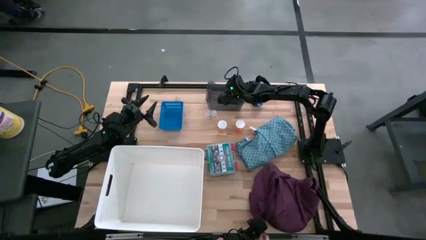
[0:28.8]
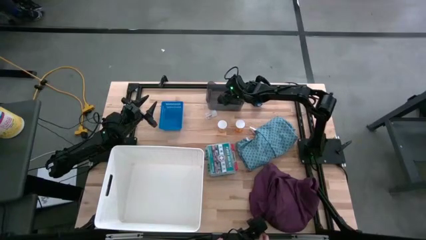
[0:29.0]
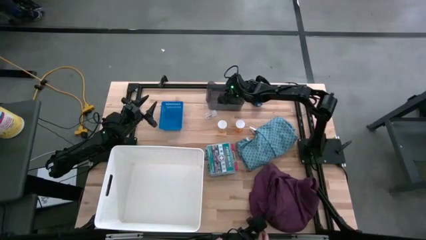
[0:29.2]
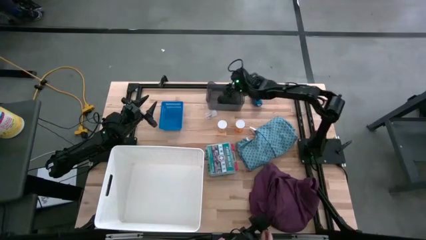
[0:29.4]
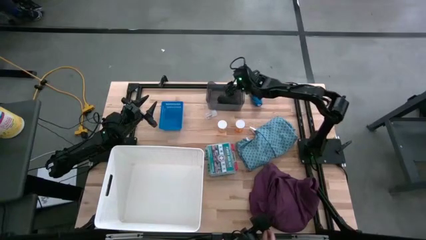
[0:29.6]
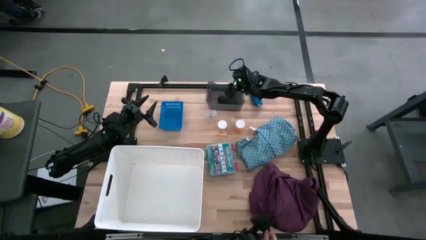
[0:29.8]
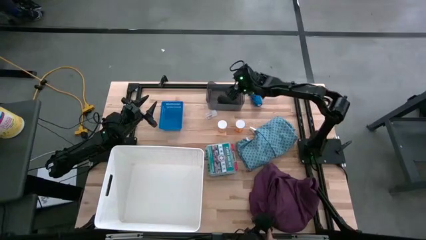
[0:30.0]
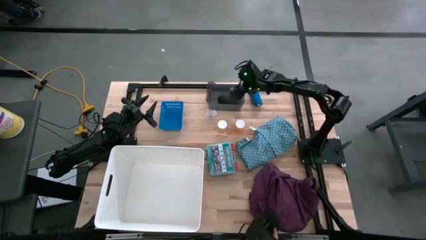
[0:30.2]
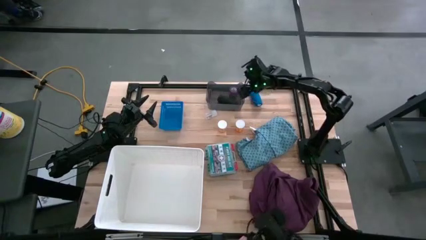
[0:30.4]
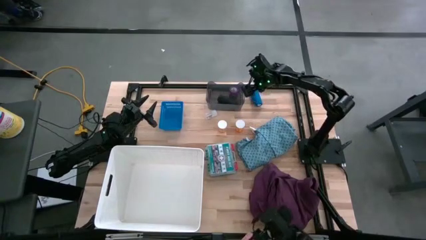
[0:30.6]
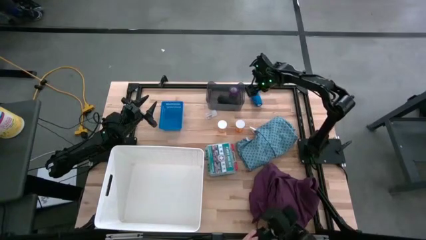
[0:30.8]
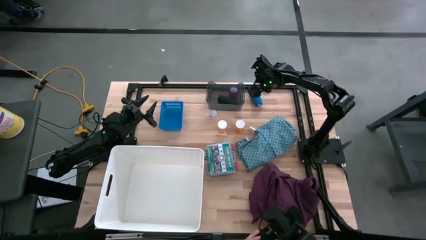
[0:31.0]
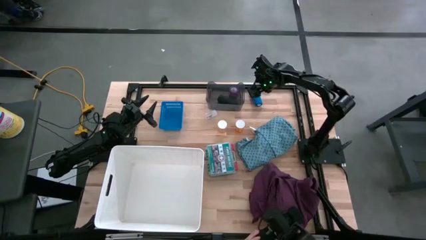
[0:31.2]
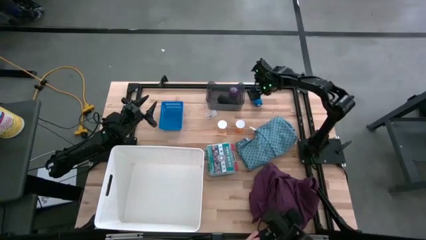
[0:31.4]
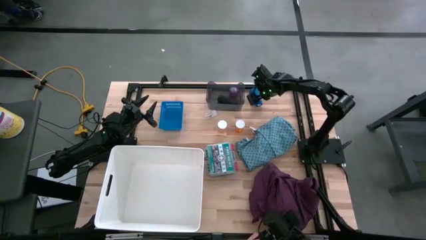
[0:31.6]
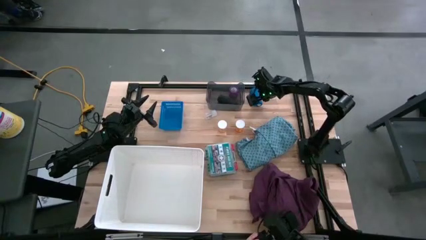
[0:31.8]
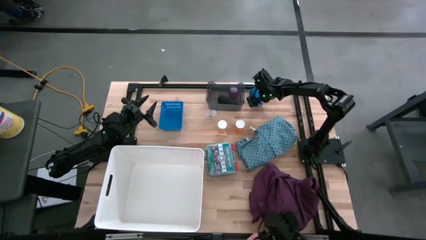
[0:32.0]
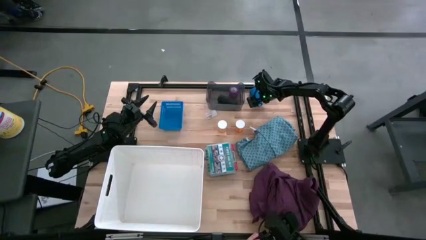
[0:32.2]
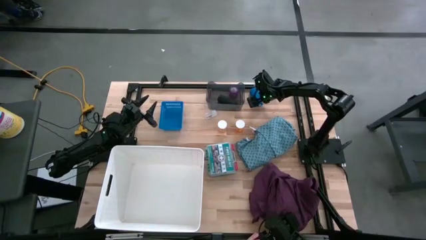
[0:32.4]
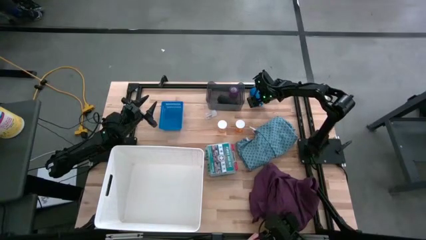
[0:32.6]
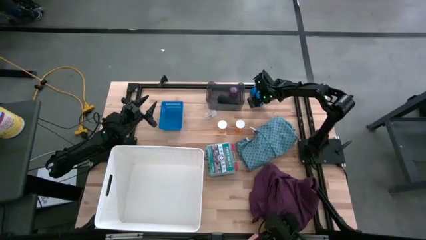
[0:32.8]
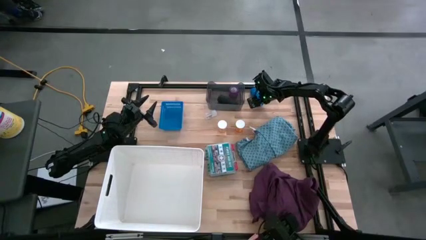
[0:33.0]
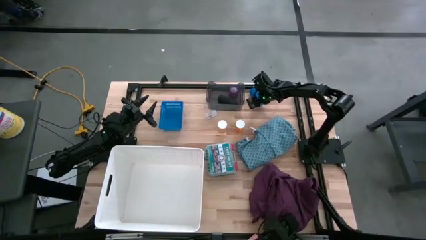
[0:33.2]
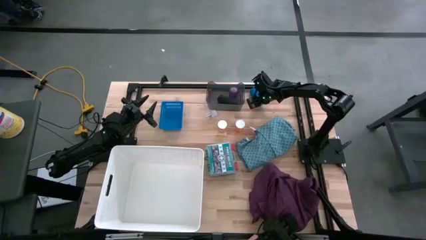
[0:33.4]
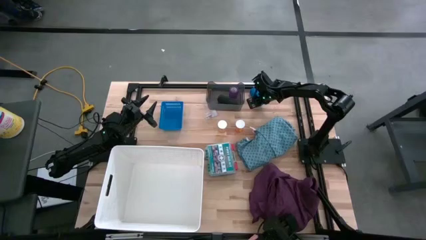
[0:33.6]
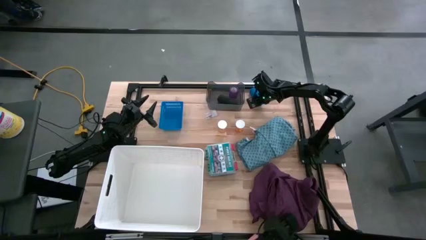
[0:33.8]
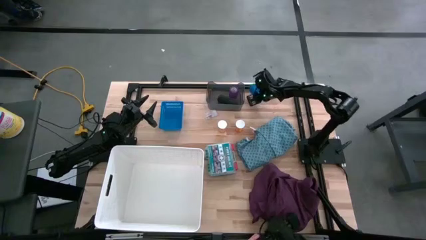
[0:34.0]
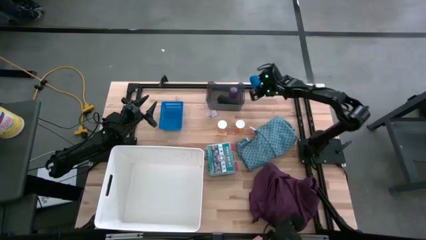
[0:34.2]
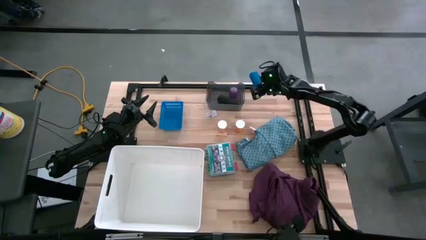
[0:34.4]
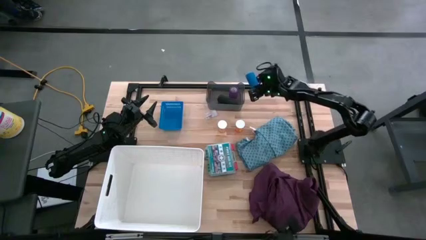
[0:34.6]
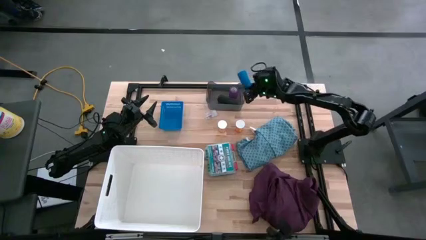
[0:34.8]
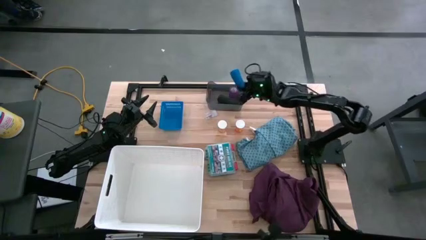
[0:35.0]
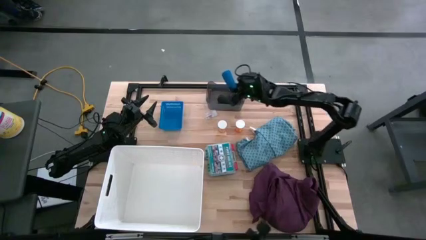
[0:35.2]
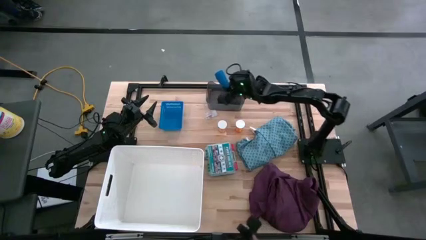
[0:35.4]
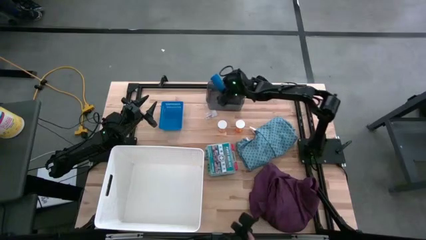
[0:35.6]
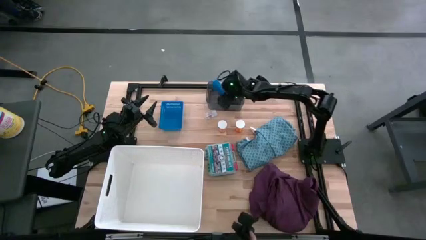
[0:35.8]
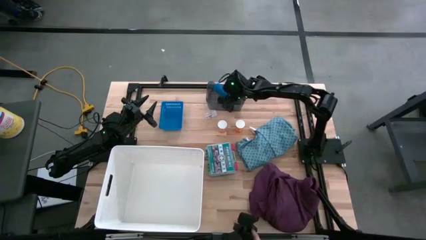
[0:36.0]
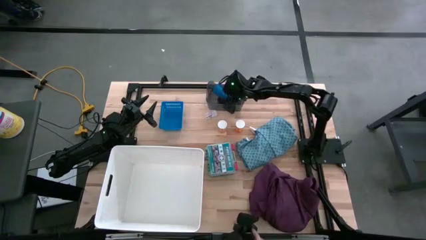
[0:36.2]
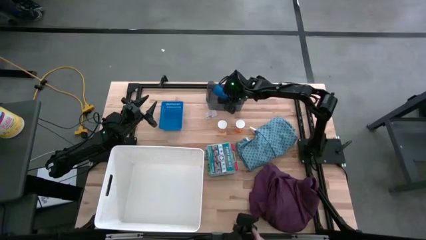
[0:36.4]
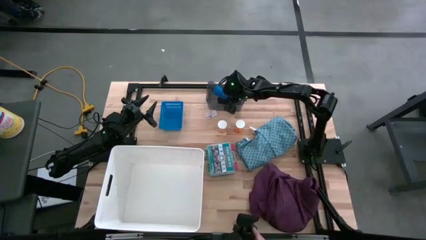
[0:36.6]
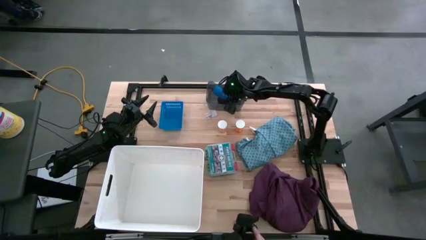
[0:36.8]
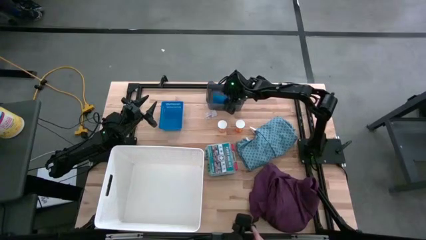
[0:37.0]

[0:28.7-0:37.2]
Task: Pick & place medical supplies in basket/bin
Put the blue bandage into the black bin

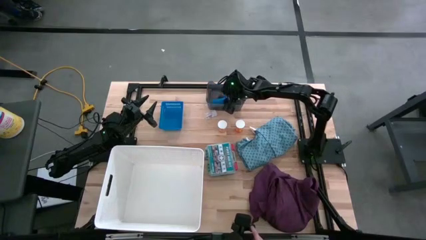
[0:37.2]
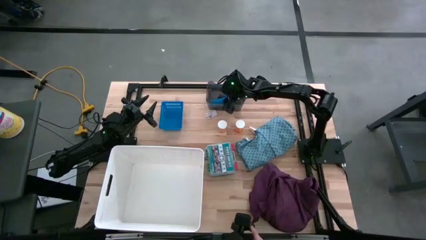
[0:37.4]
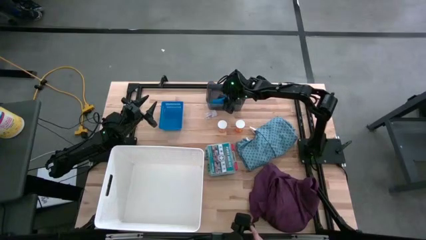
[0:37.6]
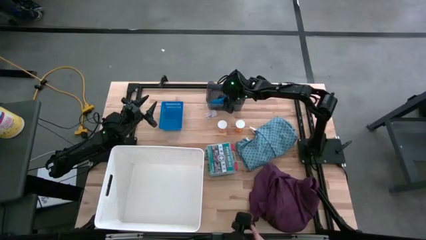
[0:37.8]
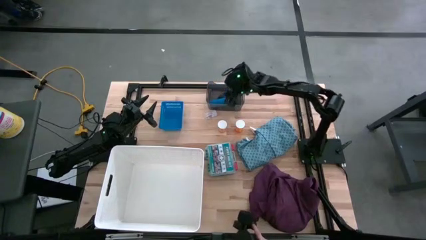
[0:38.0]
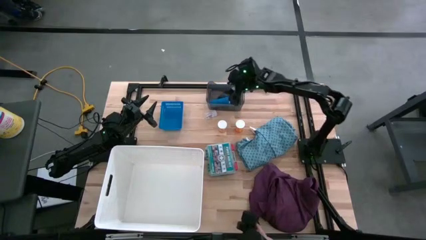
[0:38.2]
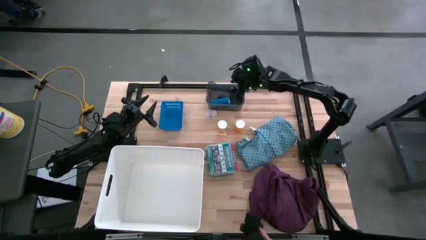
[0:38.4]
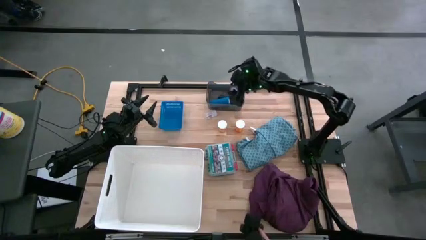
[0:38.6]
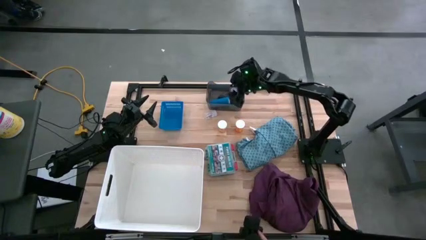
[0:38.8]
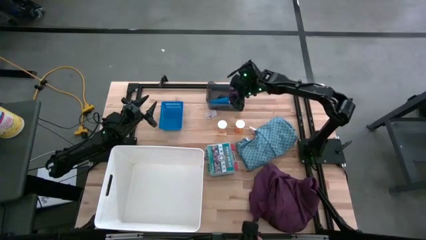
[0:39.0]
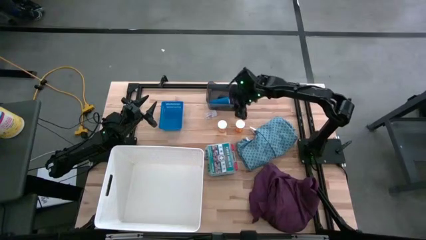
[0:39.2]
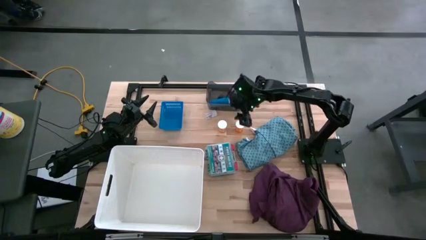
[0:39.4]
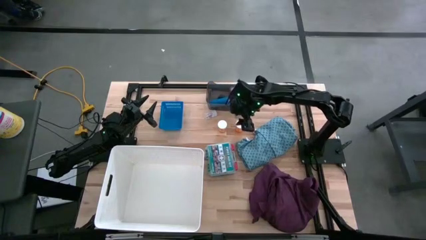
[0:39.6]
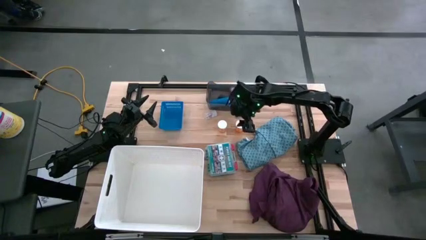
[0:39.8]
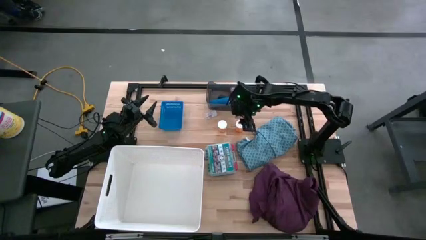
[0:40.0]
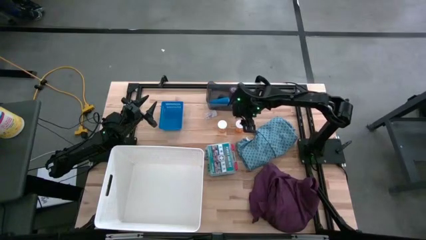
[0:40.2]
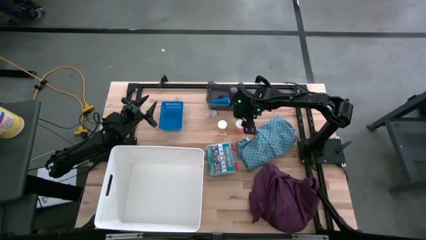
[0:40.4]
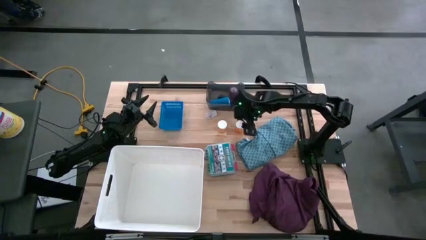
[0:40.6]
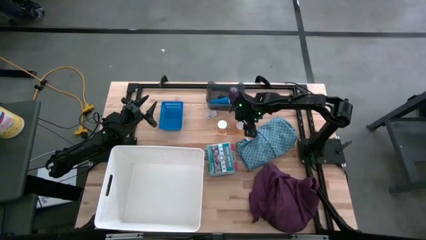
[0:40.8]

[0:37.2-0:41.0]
Put the orange pill bottle into the blue bin

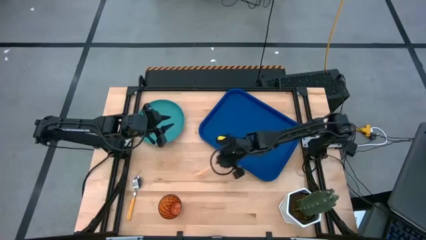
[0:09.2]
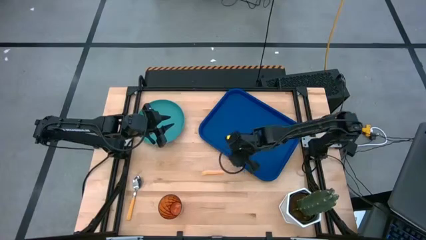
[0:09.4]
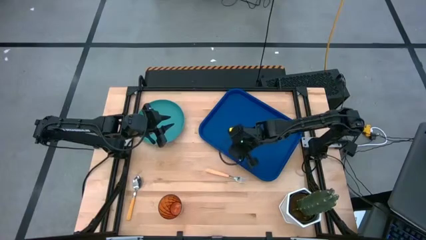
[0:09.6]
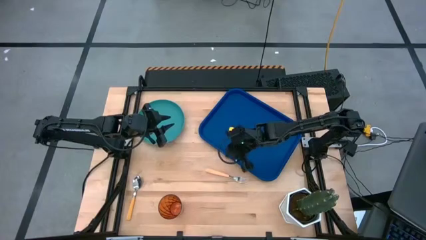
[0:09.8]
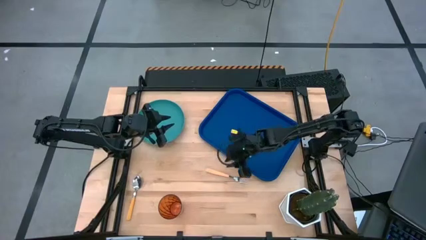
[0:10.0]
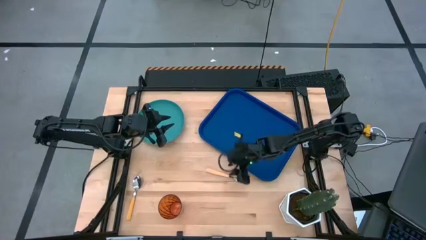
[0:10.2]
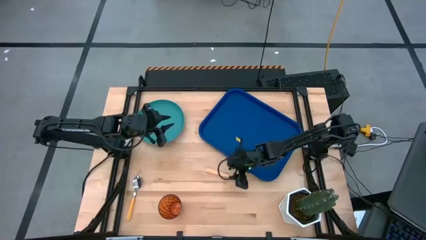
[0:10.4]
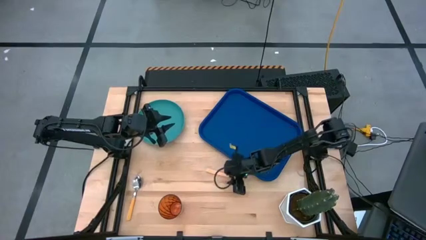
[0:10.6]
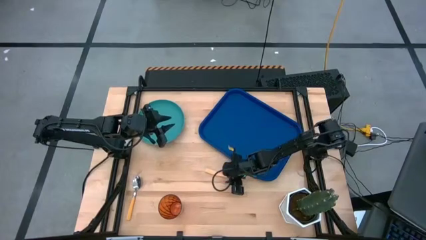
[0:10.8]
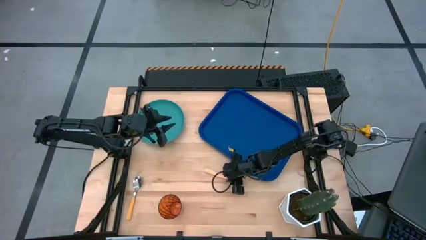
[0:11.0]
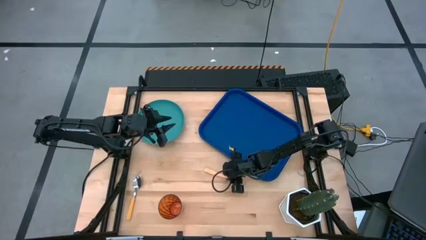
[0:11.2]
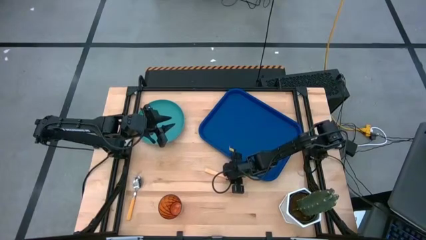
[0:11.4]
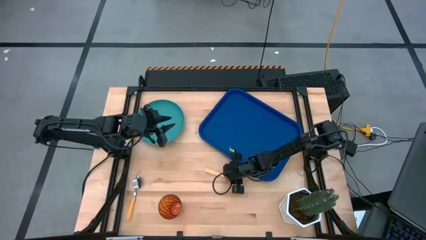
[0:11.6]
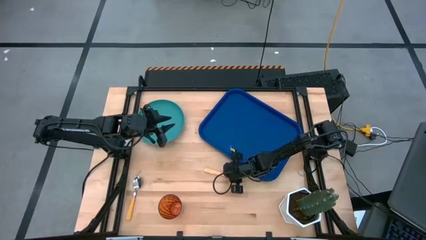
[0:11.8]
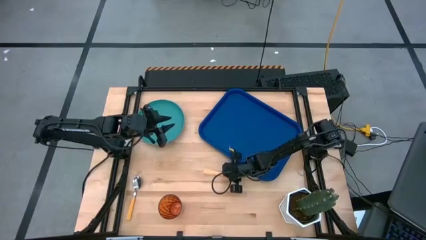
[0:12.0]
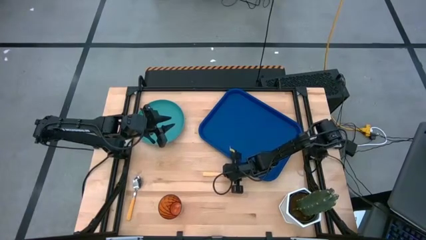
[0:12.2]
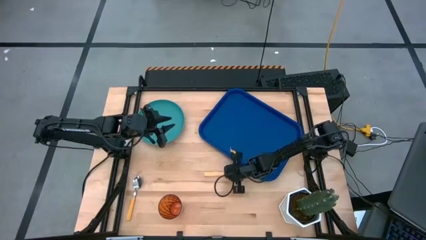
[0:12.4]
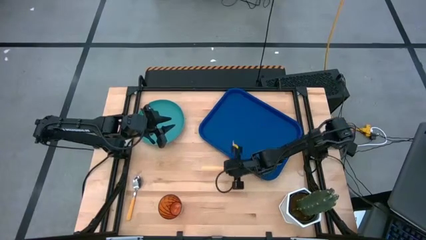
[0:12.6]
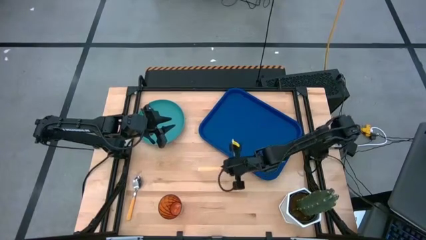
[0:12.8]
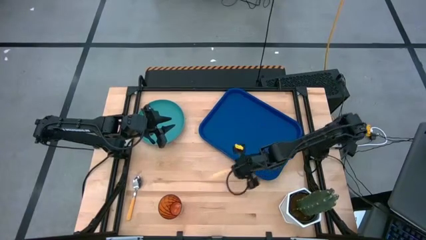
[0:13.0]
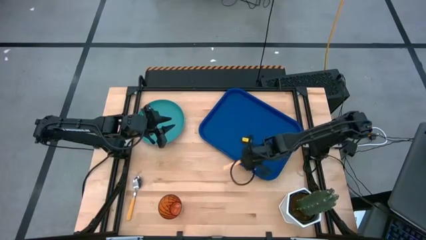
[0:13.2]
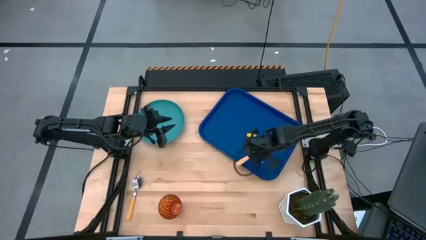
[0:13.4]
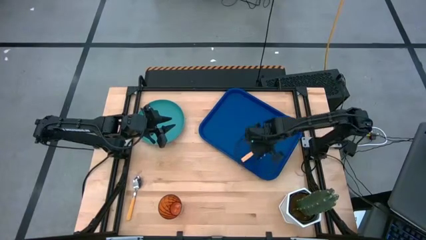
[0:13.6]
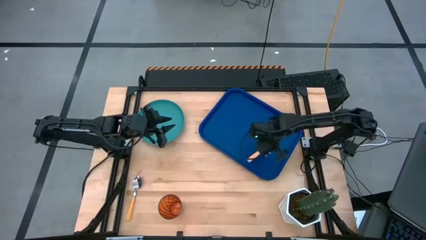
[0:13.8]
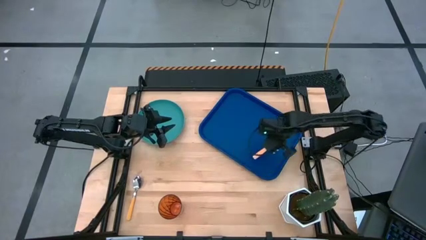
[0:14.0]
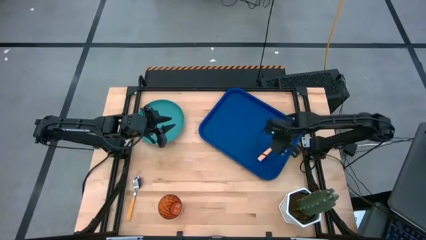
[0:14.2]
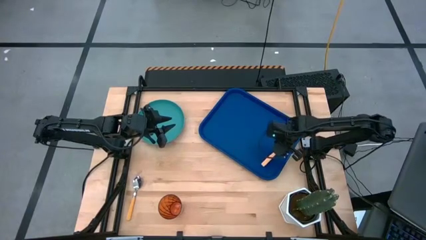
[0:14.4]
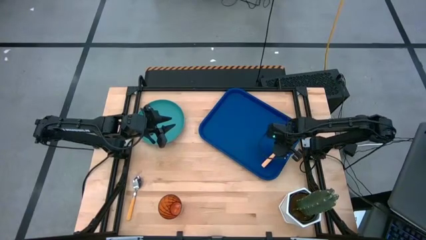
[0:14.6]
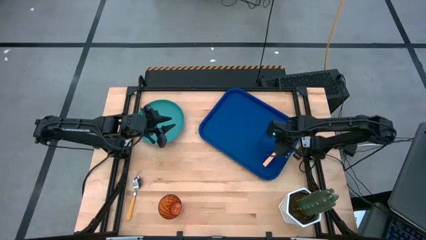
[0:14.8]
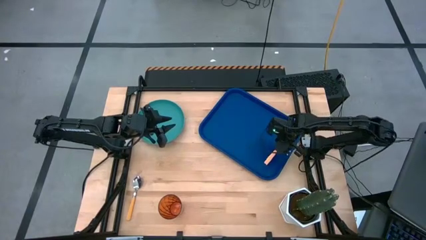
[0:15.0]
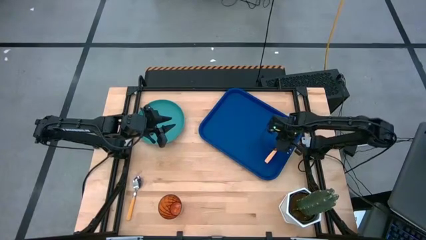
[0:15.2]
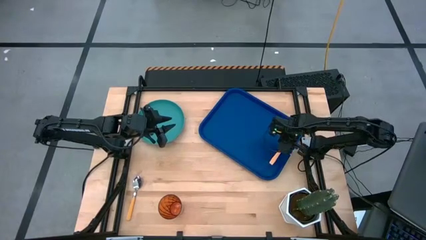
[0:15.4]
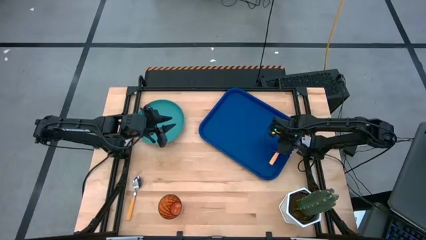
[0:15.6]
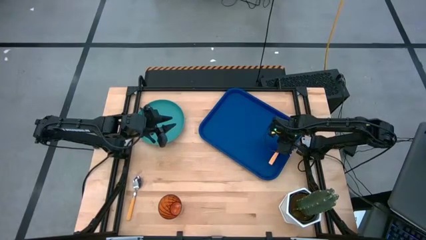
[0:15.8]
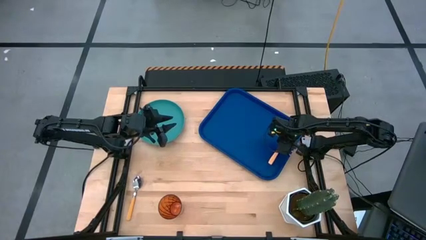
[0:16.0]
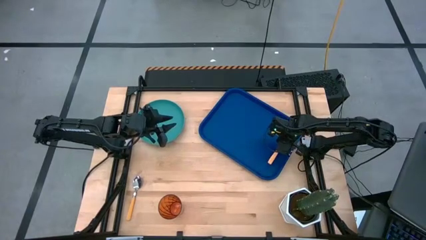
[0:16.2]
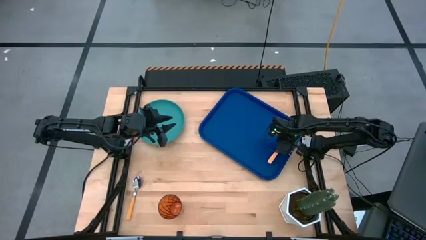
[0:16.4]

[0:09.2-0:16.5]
Task: Pick and place plate/cup/fork/spoon on tray
Put the yellow fork on the blue tray
